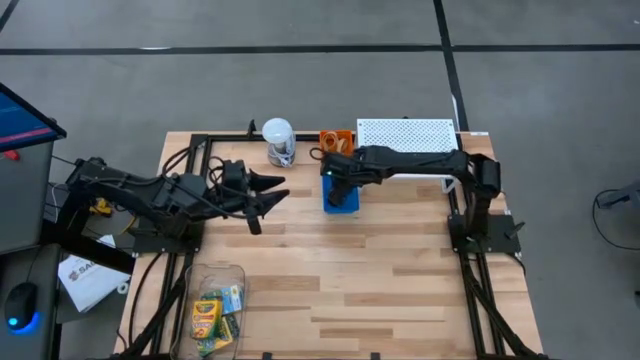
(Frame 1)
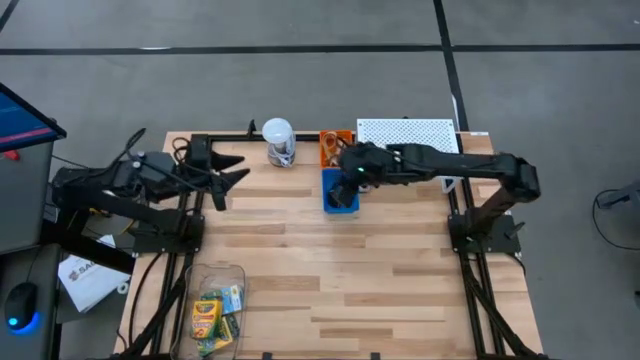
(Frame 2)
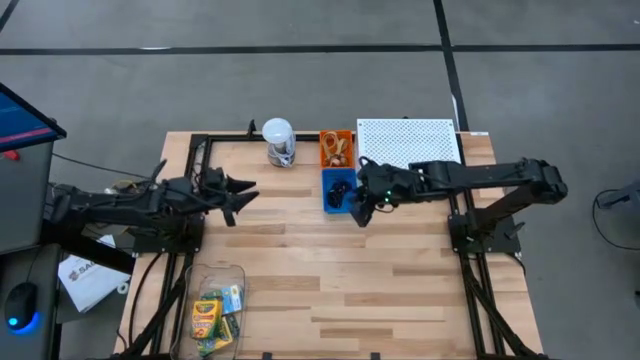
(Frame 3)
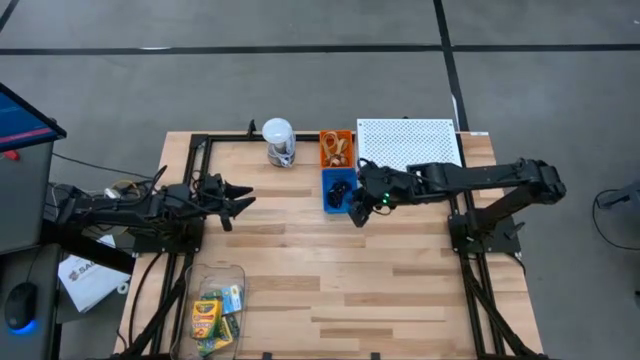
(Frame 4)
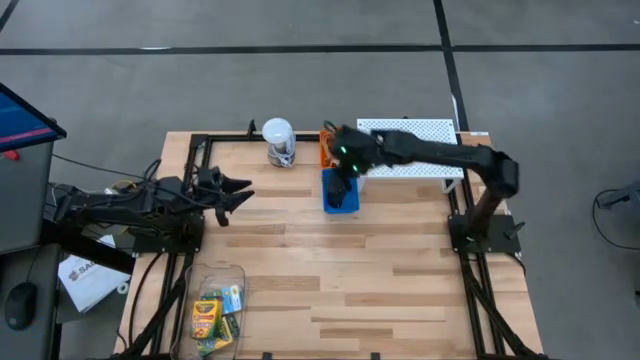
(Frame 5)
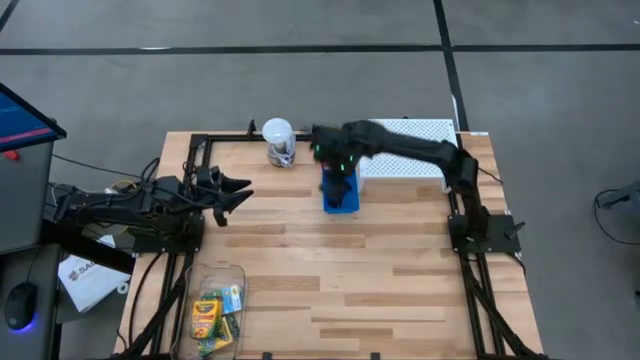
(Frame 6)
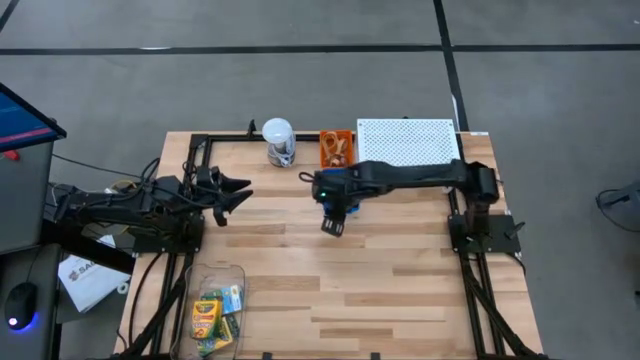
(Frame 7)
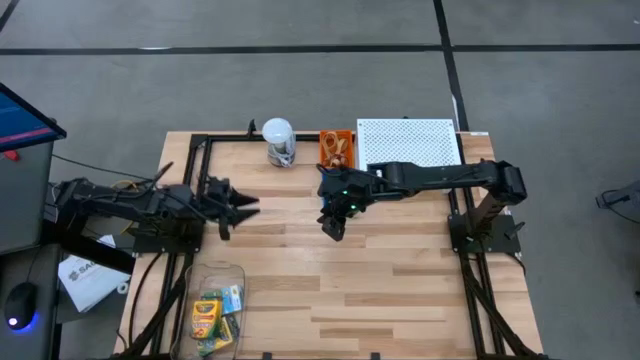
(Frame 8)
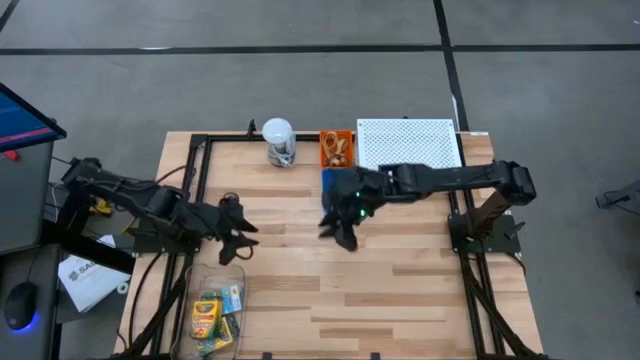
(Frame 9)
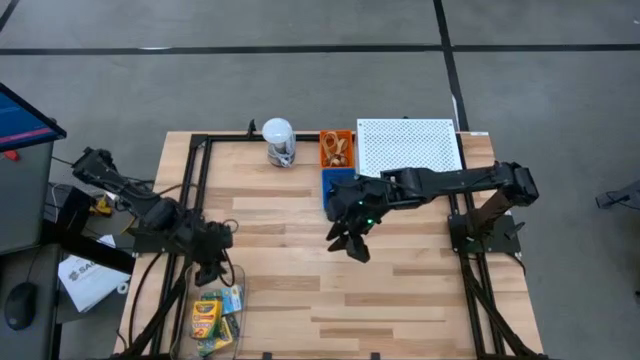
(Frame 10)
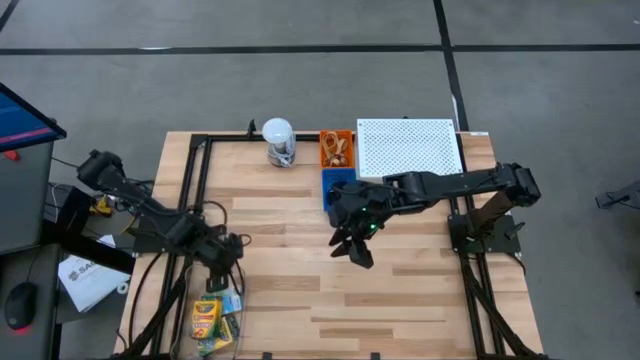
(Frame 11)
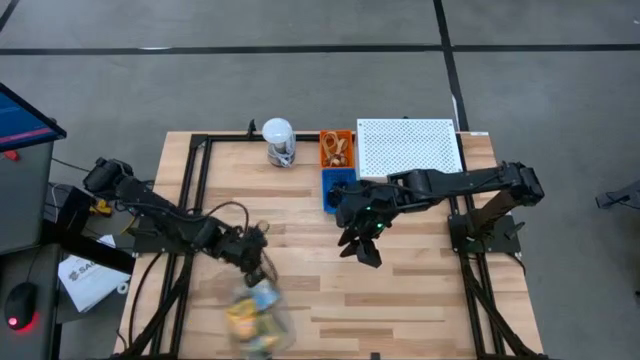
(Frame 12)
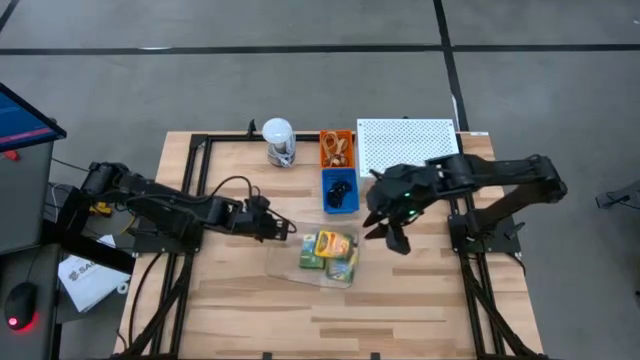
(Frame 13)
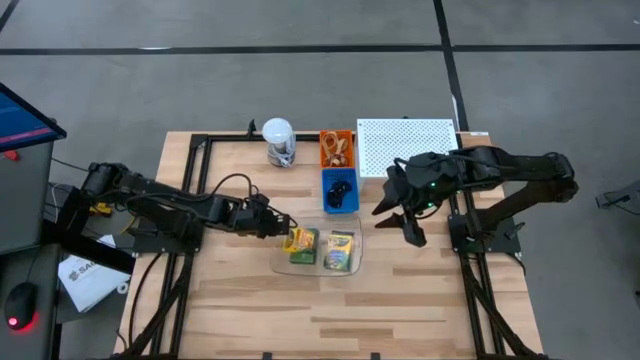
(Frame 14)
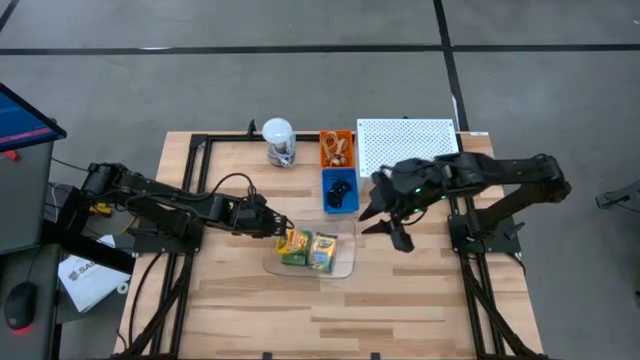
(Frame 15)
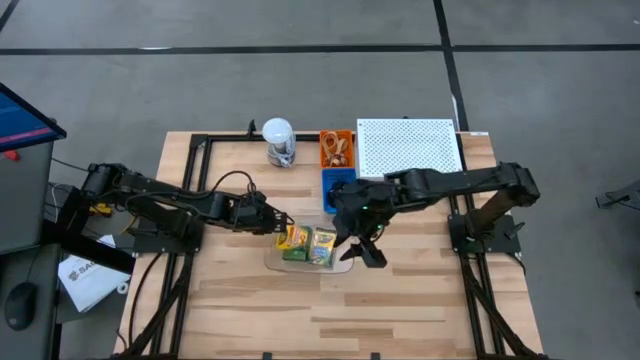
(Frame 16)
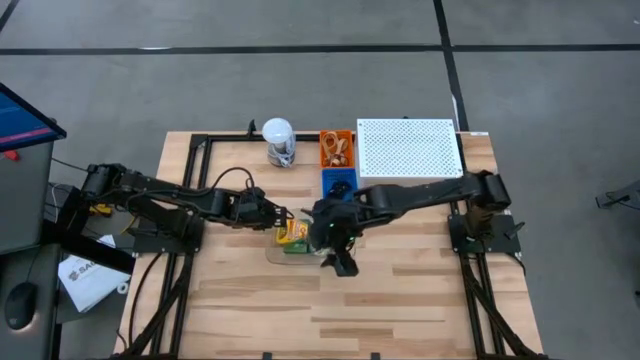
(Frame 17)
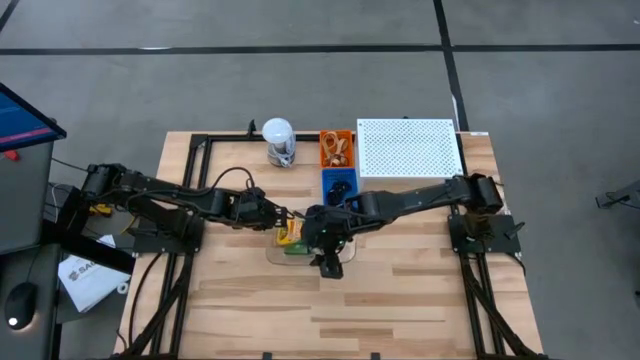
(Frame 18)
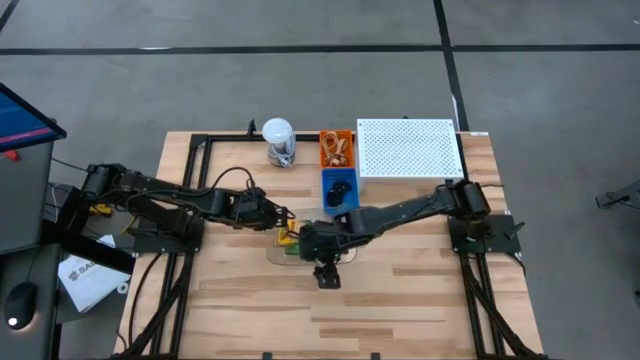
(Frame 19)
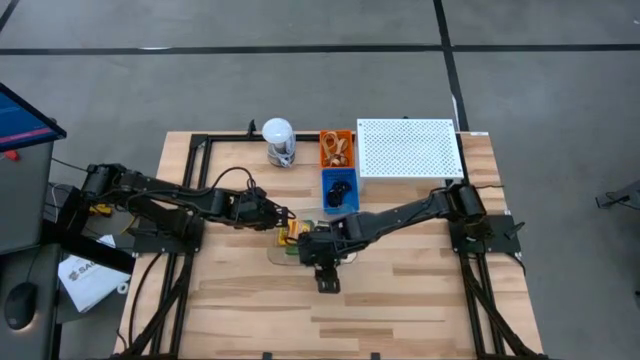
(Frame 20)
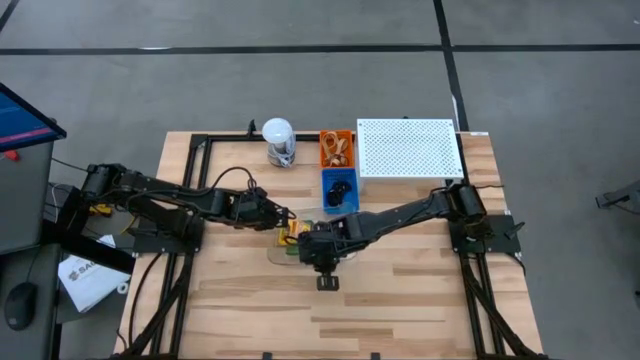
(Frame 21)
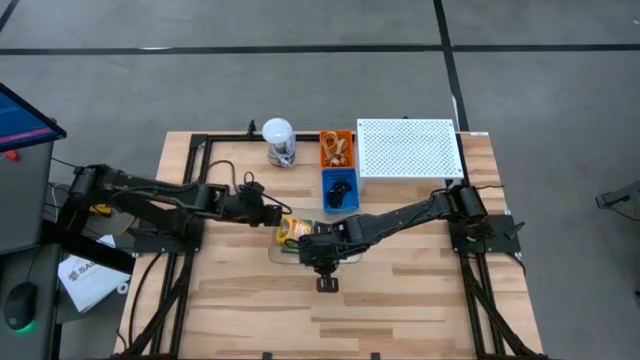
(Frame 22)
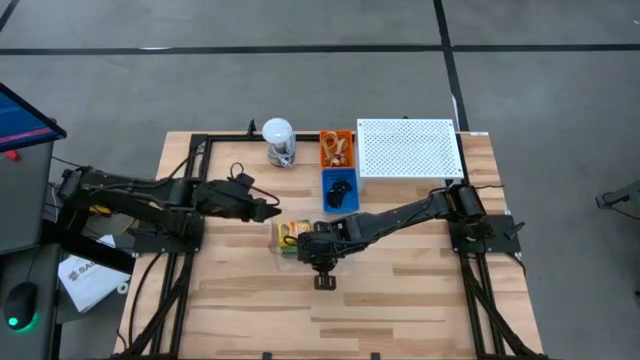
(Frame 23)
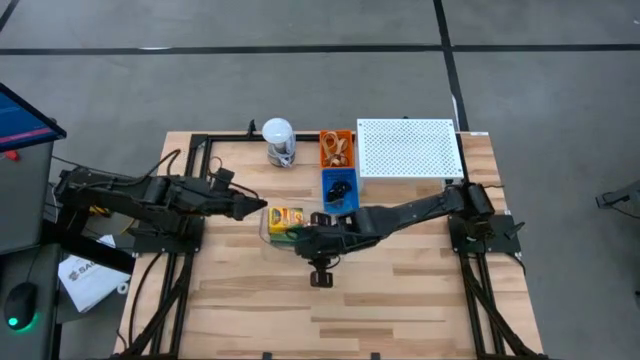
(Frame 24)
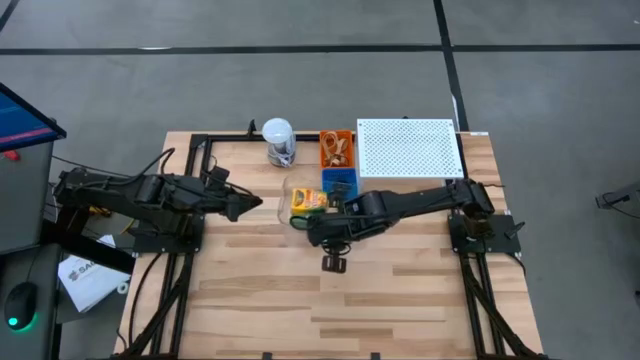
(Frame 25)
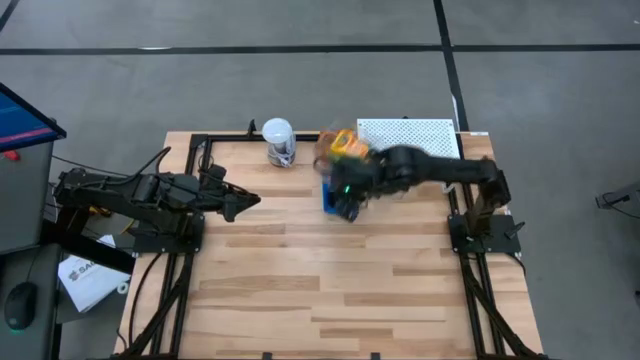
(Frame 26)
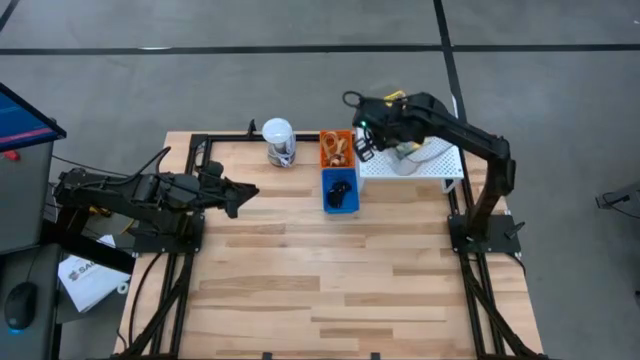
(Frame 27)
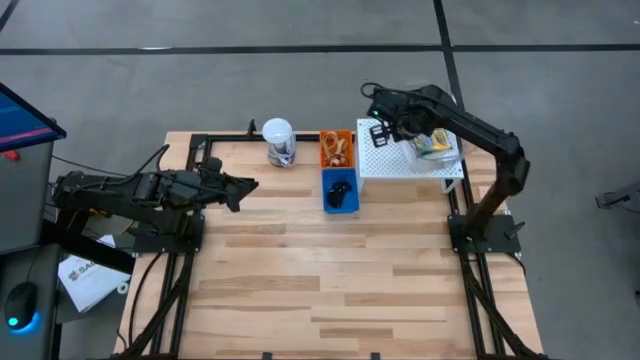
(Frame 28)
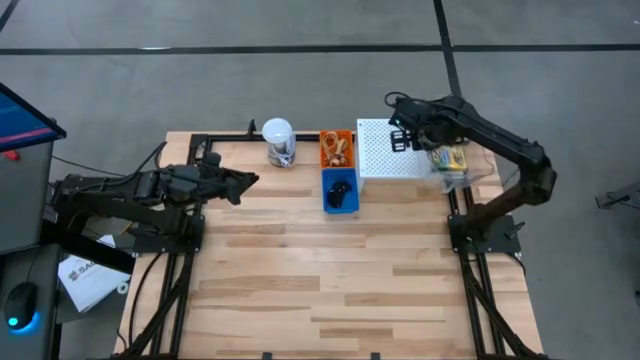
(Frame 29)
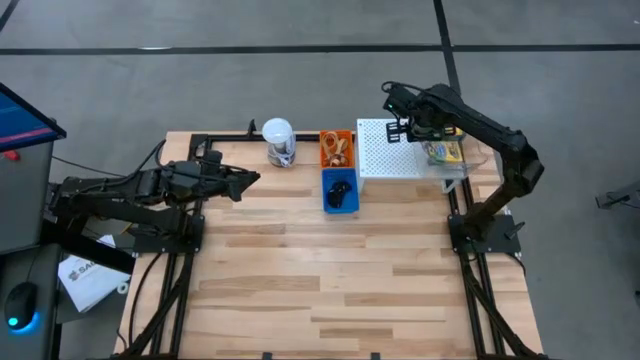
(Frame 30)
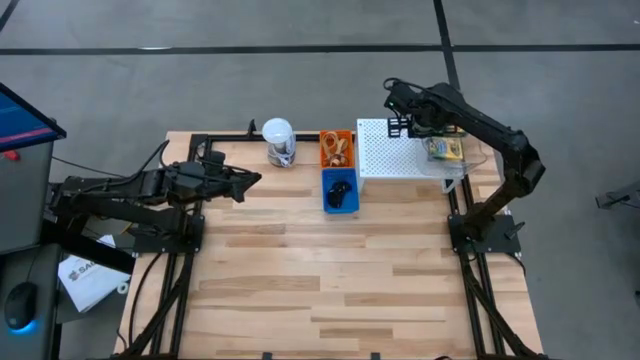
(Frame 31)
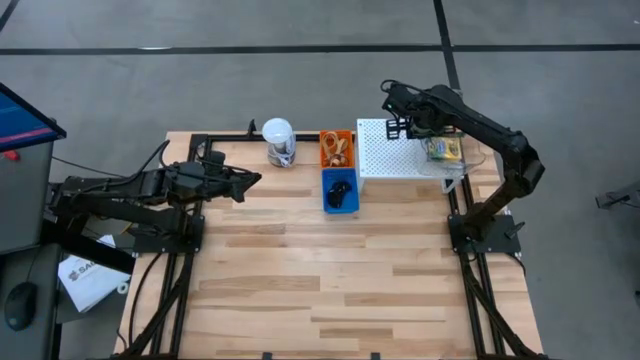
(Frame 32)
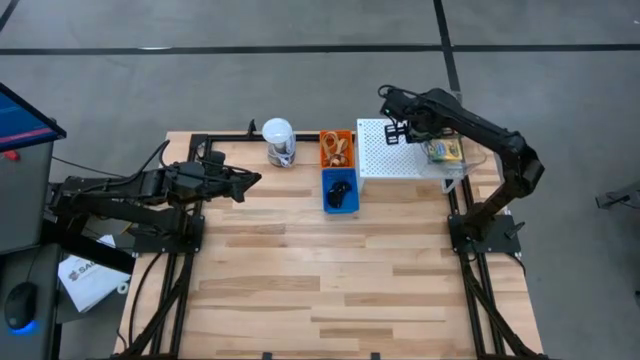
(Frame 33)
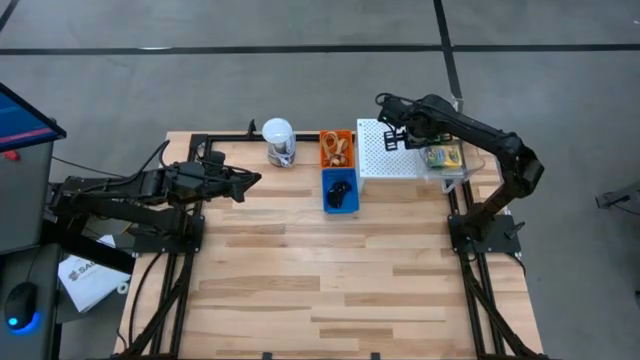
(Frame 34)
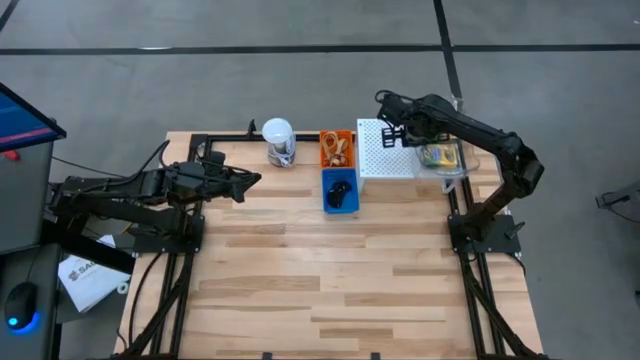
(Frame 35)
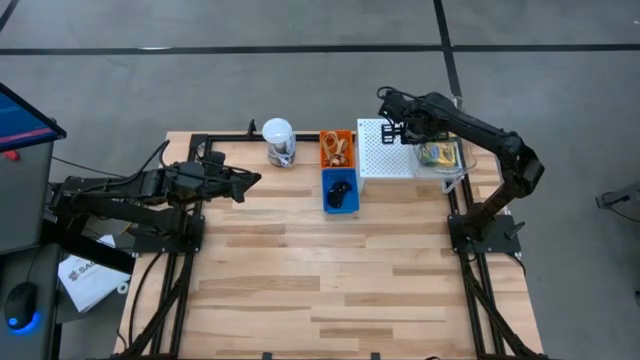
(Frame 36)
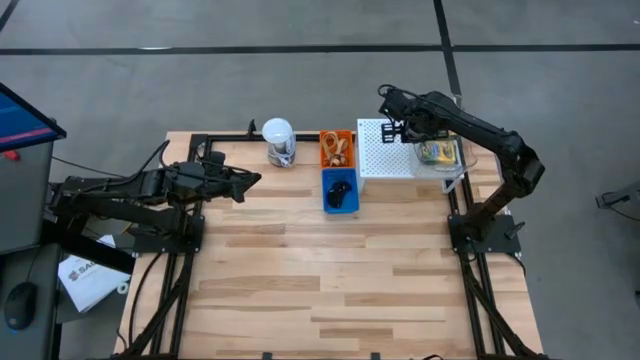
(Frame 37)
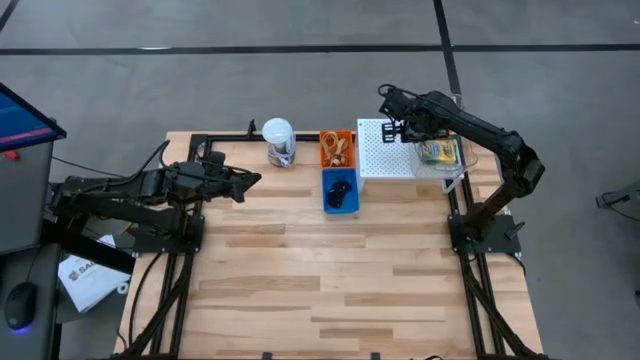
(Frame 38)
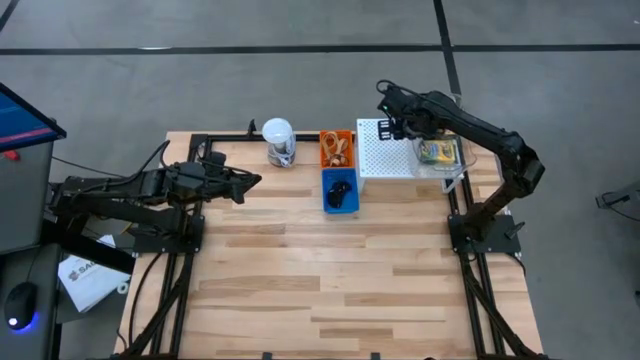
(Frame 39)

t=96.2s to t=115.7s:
Task: Pick & Place Office Desk Supplies
Put the transparent bin on the shelf

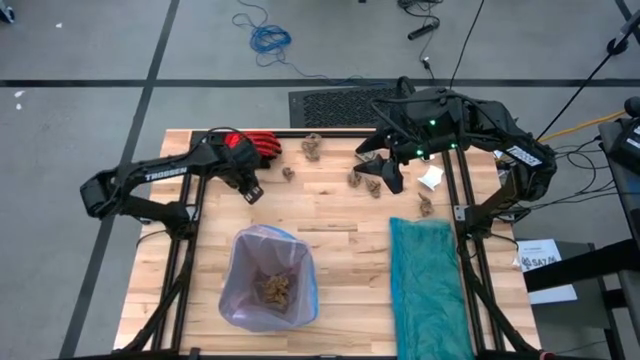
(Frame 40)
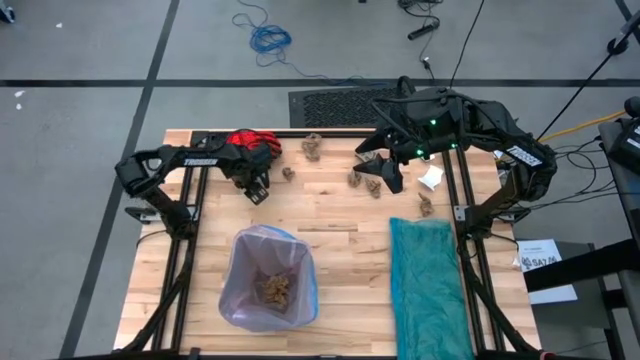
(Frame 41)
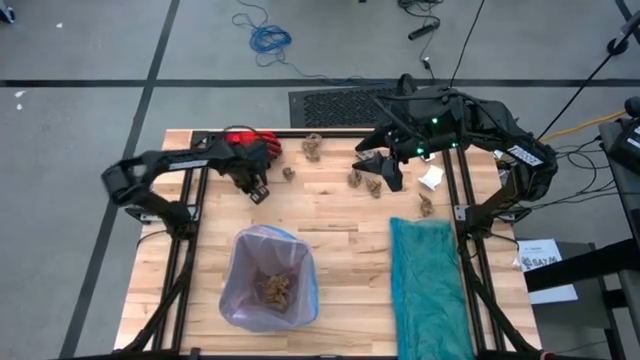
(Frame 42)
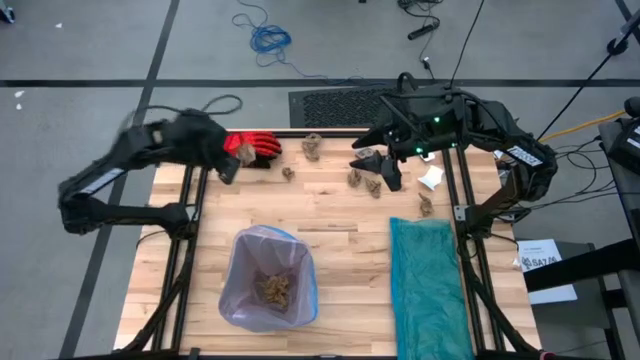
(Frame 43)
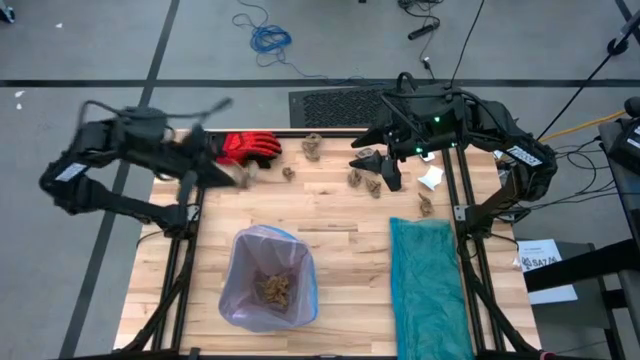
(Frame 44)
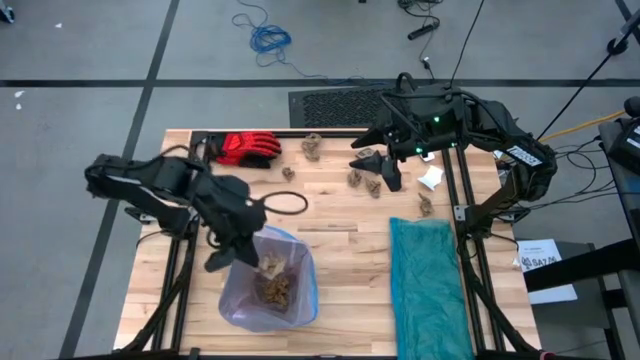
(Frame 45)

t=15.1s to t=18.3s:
Task: place trash/remove bag and relplace
Put the brown napkin into the trash bin

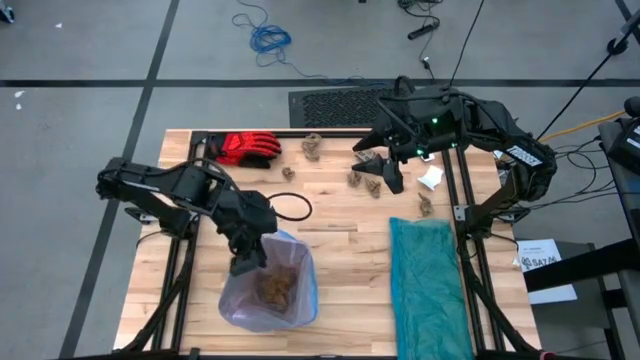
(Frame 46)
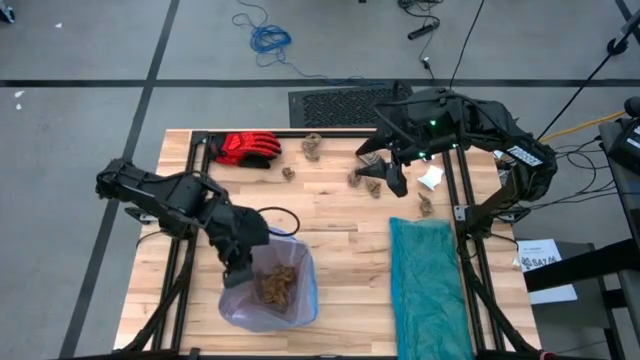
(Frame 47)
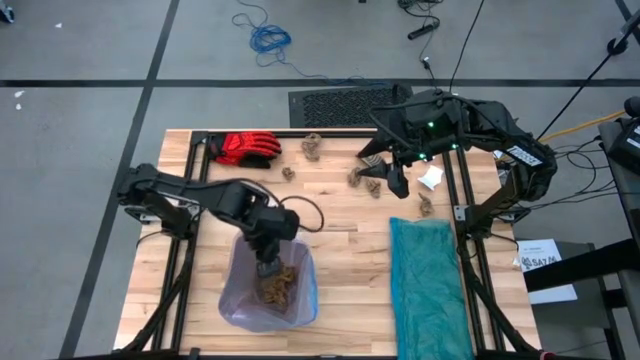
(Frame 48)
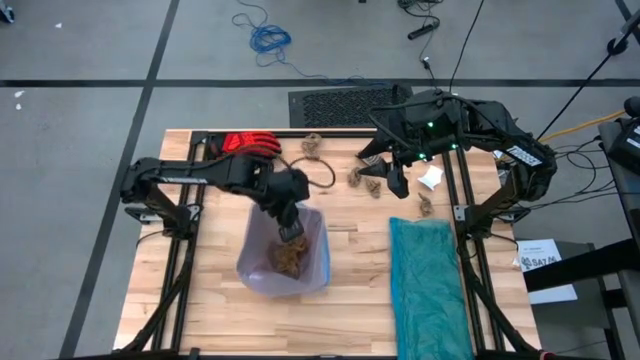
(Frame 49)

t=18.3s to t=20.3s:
Move the trash bin to the center of the table
